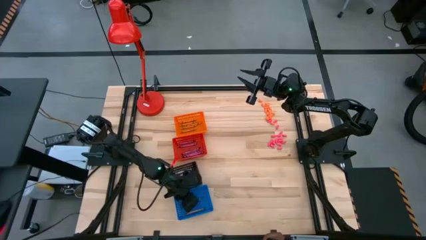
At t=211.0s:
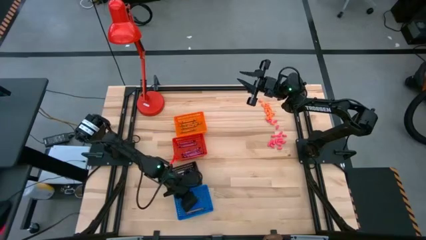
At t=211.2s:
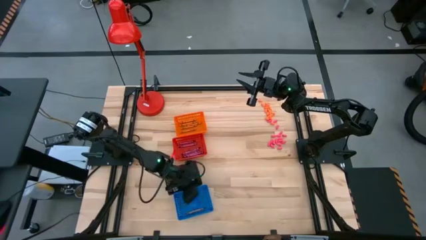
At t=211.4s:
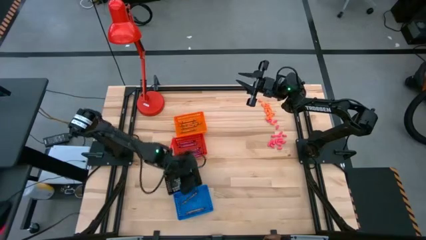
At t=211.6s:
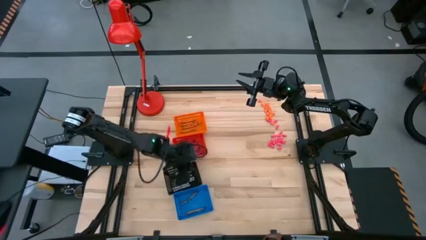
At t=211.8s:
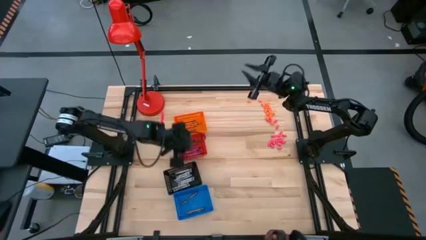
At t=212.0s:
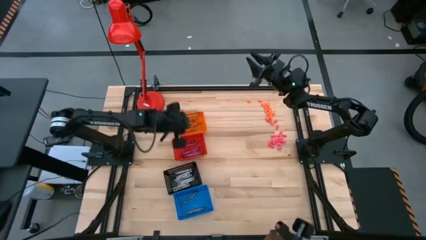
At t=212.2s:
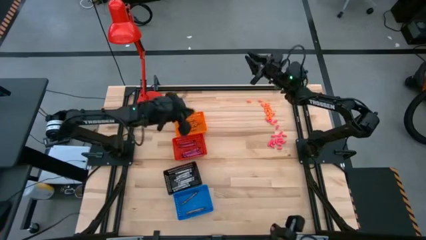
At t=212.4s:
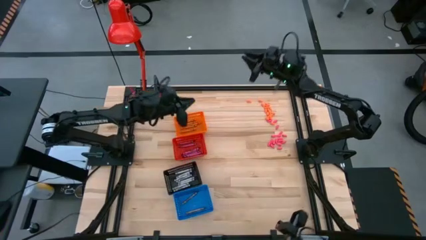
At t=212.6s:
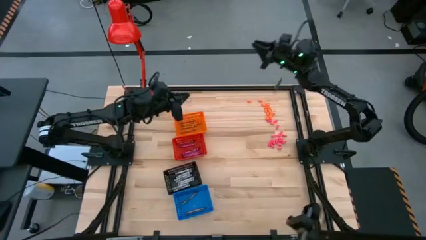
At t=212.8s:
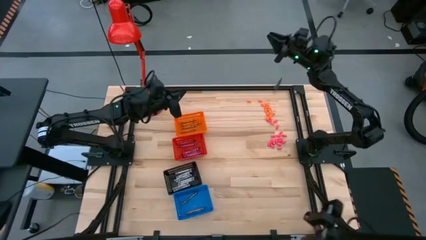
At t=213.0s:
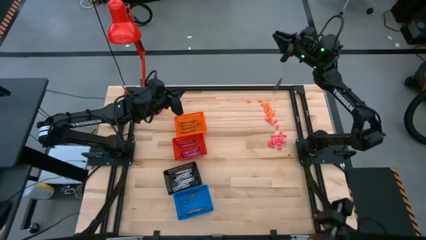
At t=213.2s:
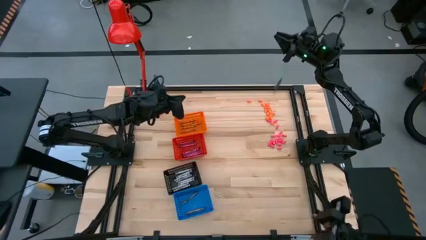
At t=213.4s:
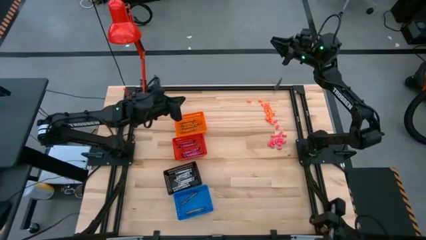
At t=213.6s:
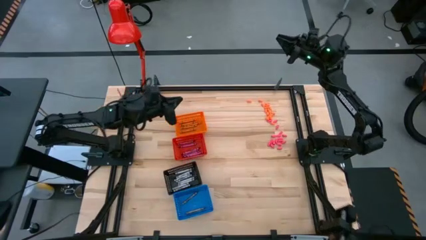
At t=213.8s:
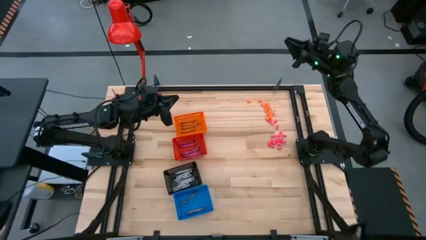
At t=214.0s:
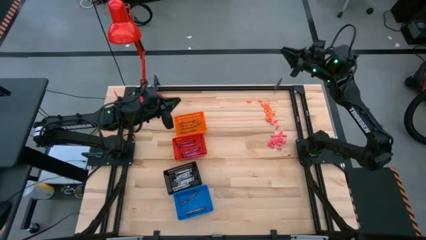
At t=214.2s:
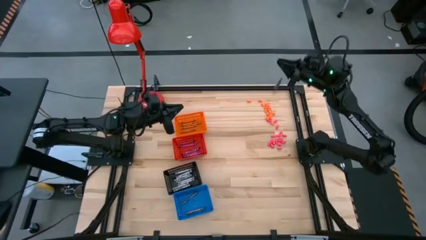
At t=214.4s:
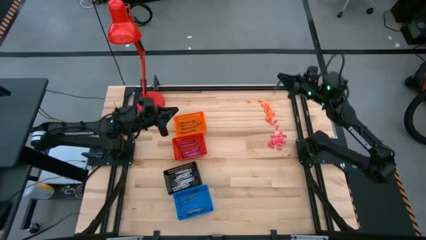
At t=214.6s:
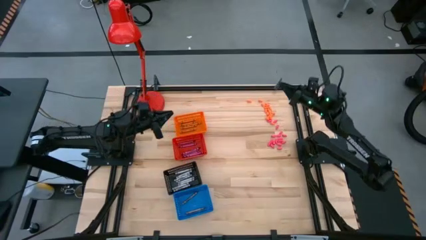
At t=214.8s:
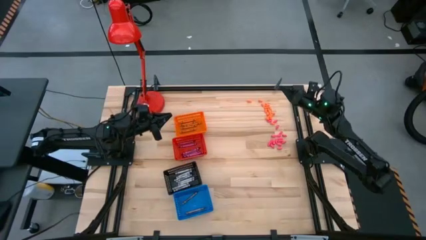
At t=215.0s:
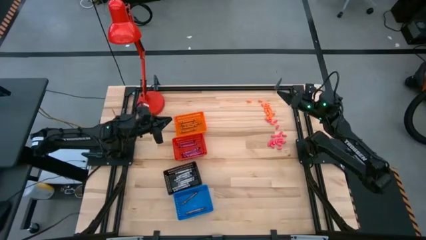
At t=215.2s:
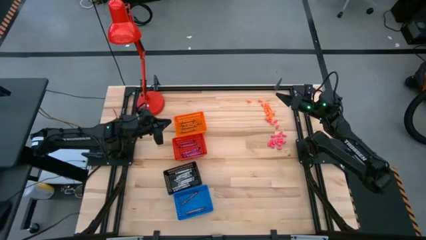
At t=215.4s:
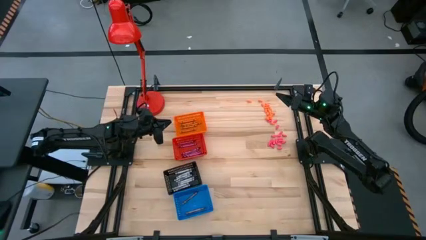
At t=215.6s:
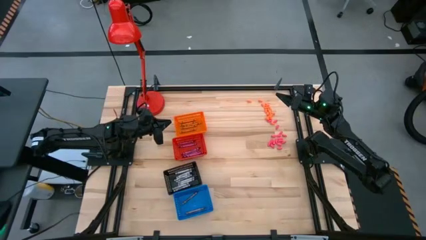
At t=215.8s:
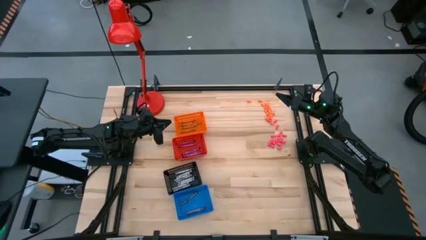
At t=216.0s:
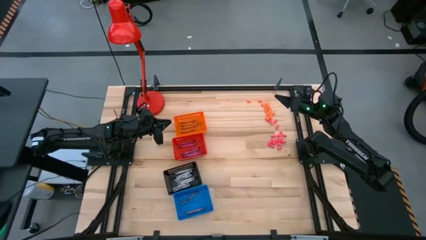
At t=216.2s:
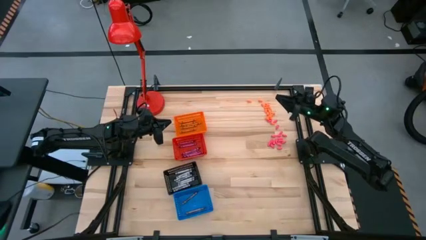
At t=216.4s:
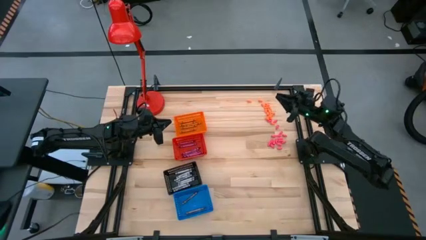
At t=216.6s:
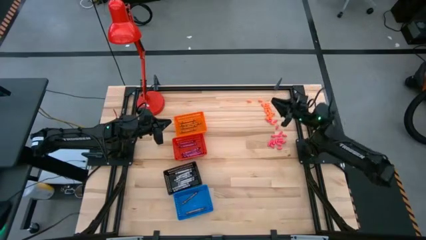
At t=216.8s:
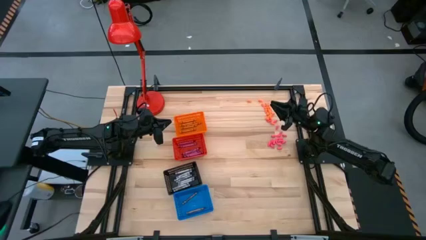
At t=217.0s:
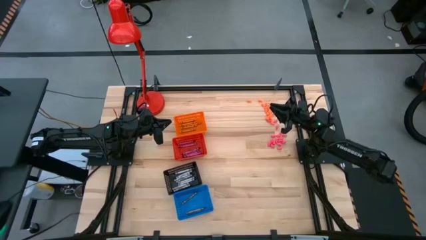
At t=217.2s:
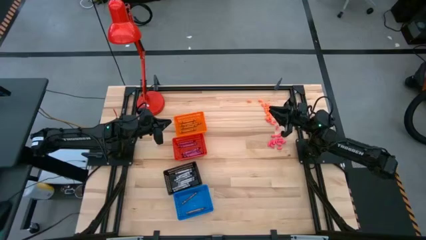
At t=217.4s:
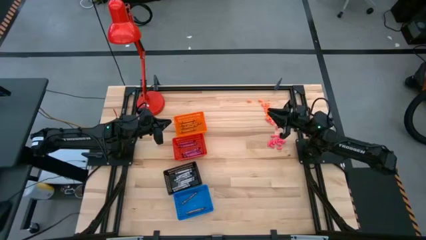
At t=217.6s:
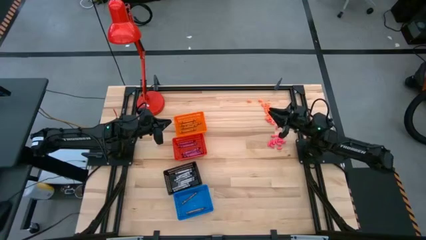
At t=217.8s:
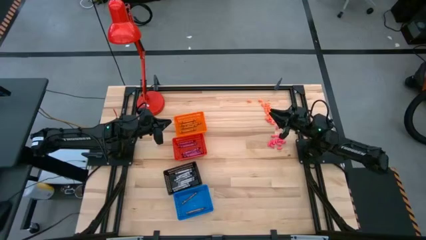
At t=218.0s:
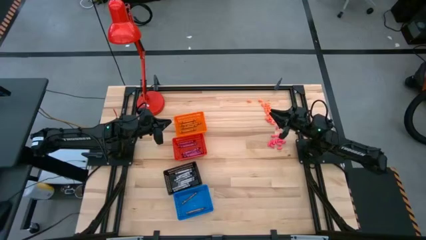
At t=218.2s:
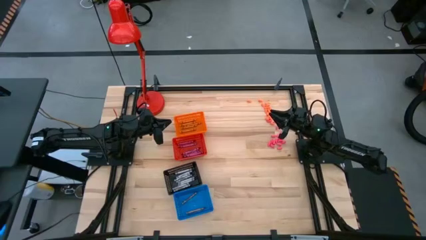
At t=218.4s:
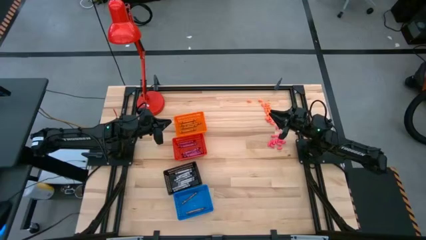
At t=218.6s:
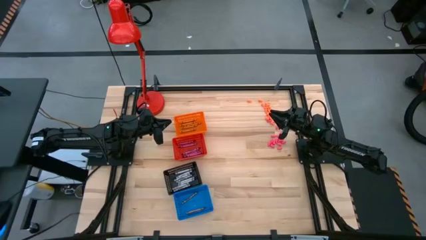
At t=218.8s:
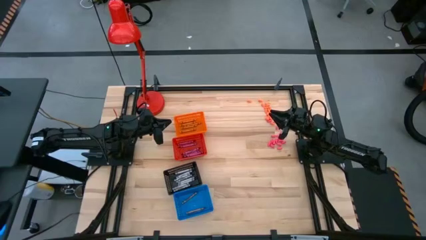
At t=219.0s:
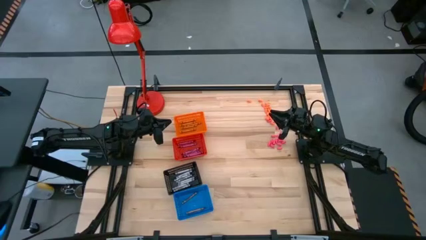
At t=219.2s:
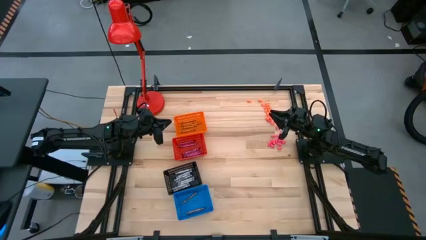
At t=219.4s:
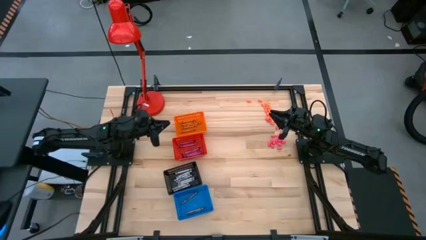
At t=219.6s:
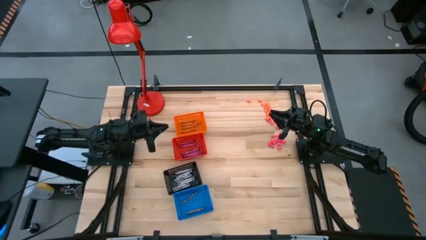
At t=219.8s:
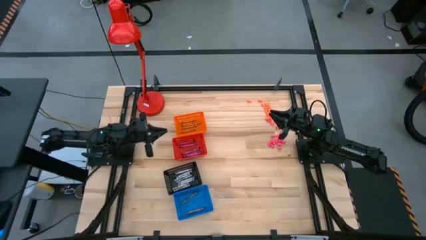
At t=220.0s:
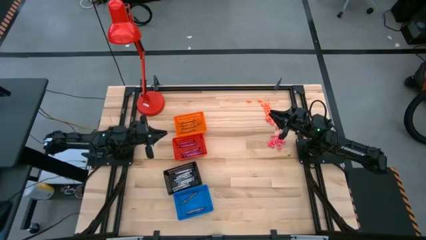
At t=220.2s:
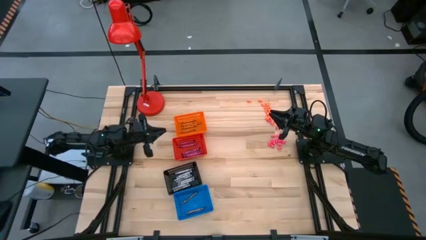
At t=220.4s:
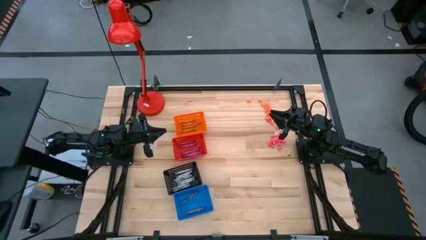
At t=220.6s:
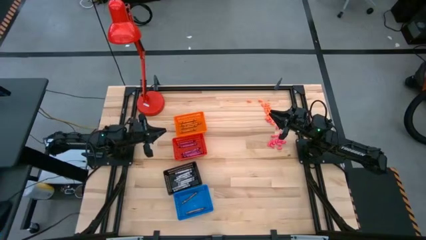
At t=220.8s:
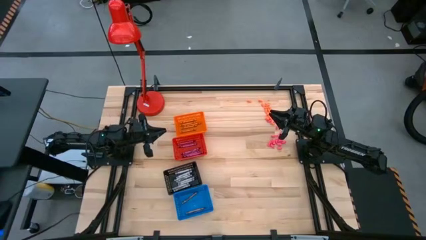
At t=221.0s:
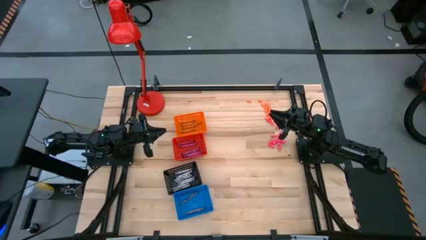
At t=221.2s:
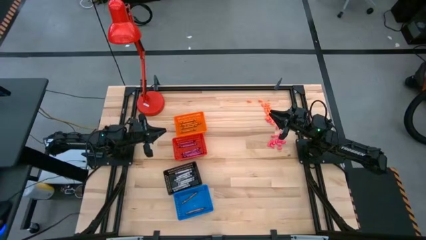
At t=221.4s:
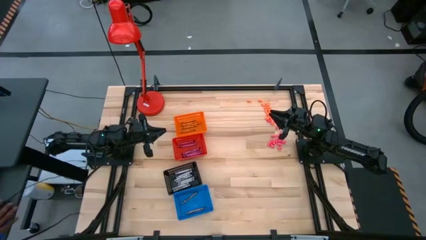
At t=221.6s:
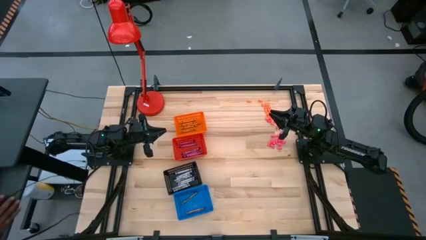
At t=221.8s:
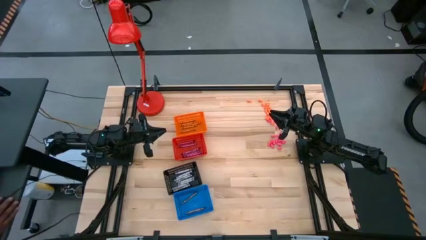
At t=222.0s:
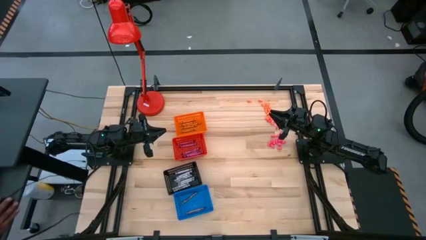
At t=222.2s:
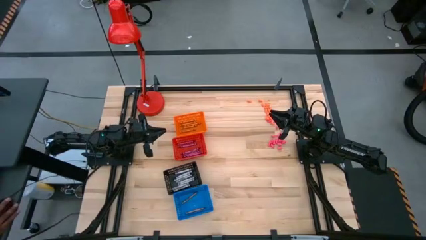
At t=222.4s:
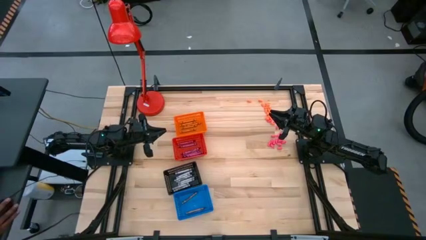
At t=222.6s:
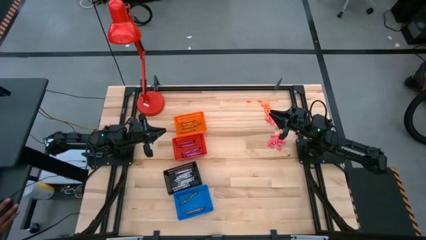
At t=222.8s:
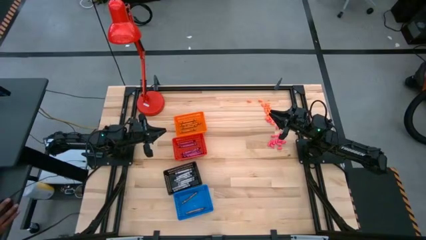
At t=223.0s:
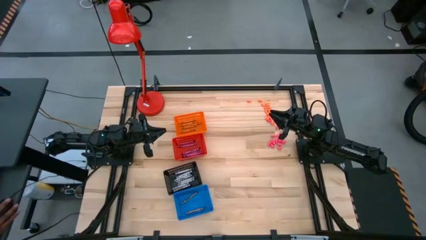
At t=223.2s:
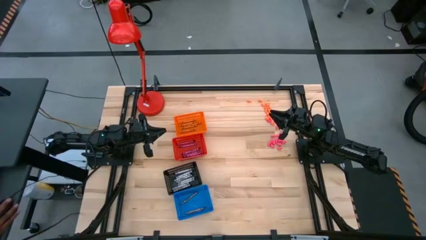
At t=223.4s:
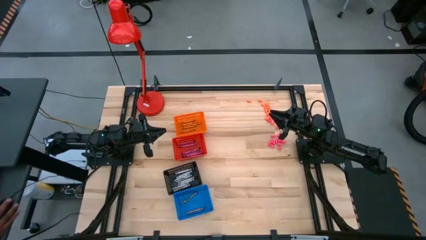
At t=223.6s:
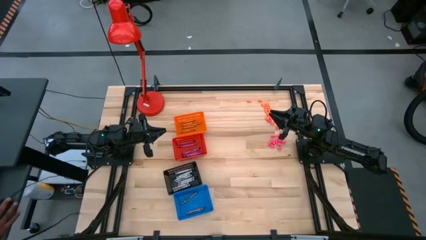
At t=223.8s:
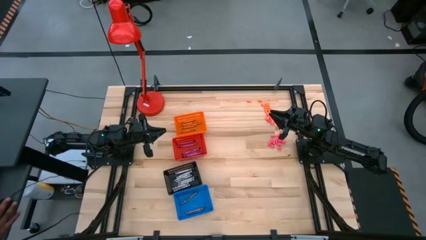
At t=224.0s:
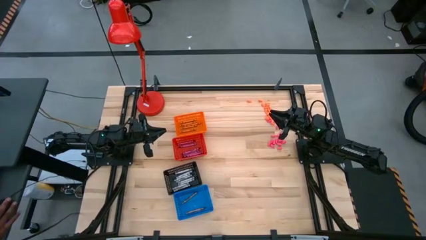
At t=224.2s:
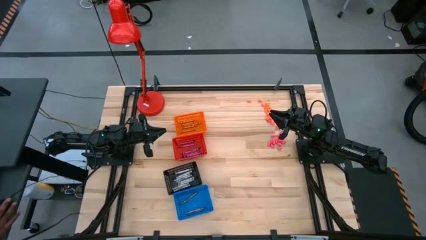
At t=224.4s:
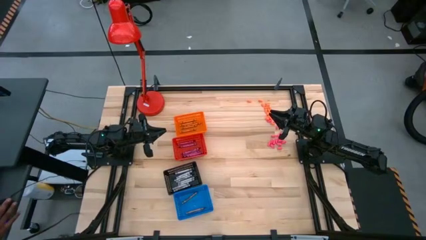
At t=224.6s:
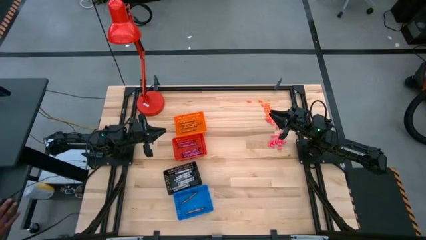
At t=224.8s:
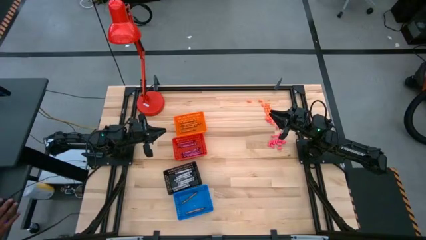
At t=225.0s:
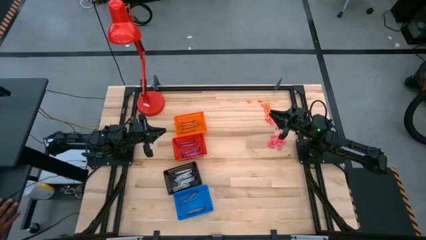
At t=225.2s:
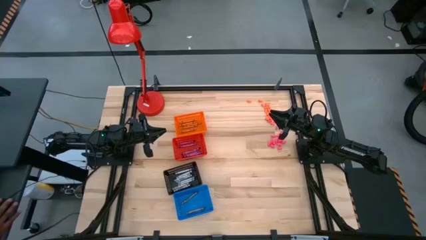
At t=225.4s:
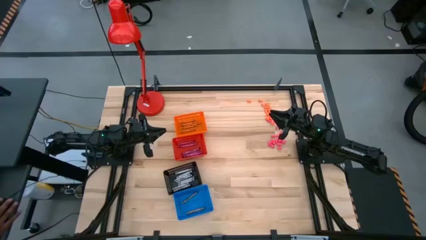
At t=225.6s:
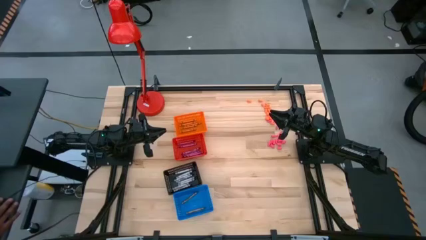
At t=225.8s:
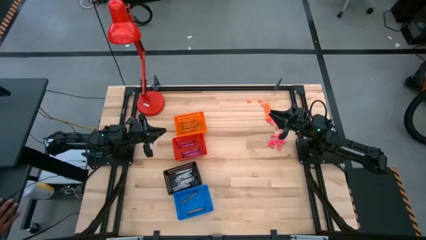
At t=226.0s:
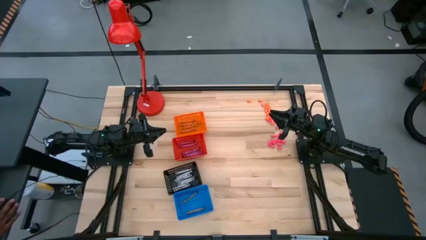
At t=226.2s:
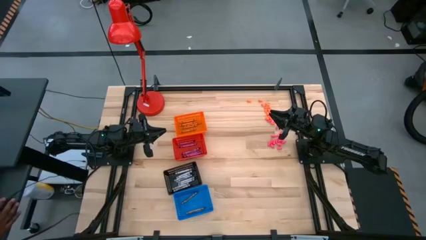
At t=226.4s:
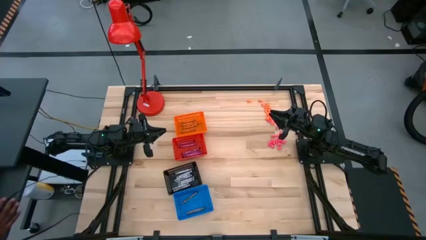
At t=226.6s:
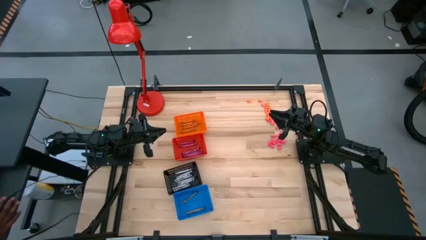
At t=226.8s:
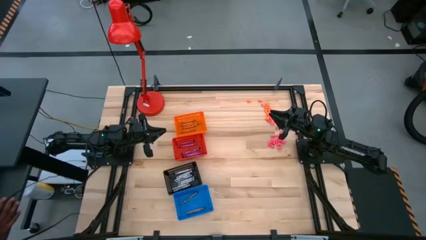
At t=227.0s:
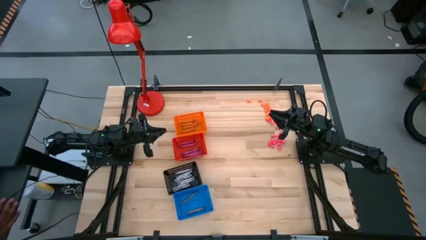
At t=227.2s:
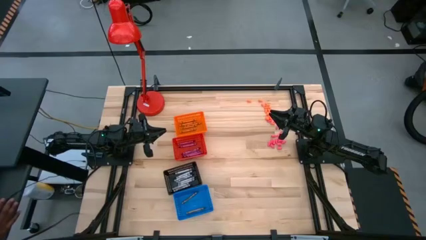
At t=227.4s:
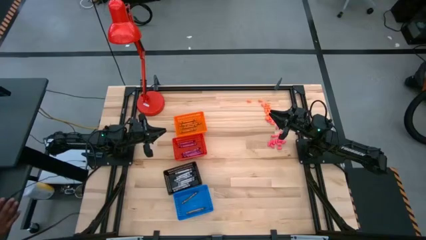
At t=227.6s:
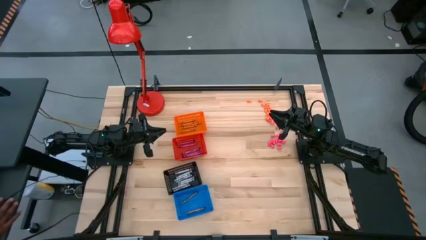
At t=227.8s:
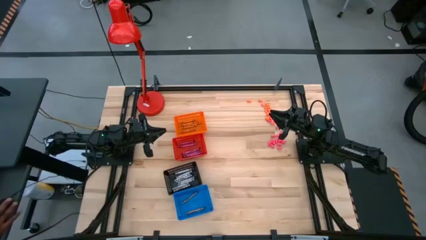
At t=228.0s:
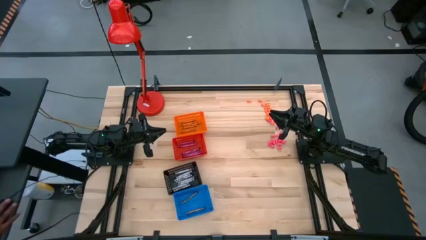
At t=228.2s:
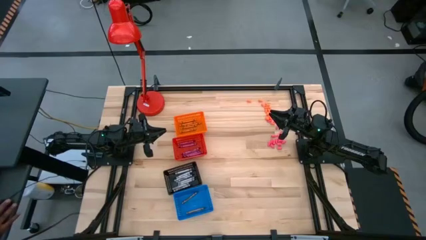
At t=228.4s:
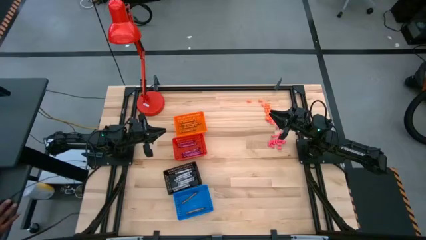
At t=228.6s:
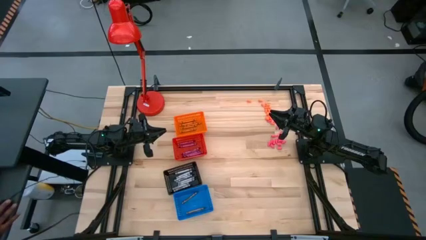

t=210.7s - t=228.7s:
Task: Sort crayons
Return to Home Position
